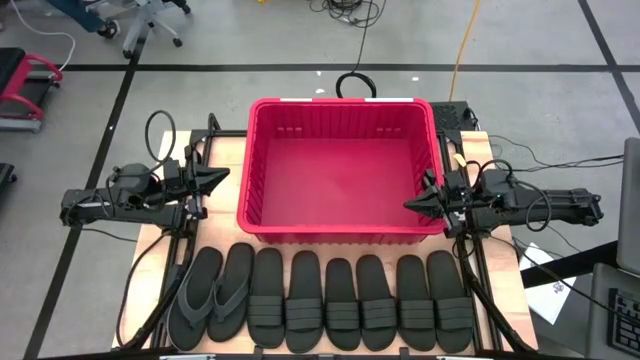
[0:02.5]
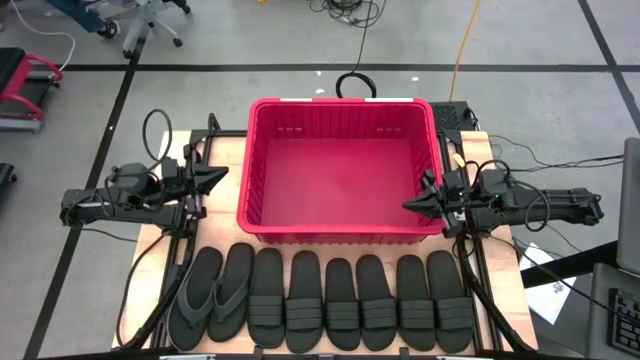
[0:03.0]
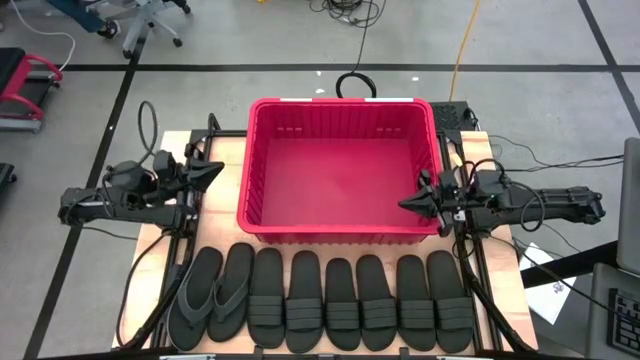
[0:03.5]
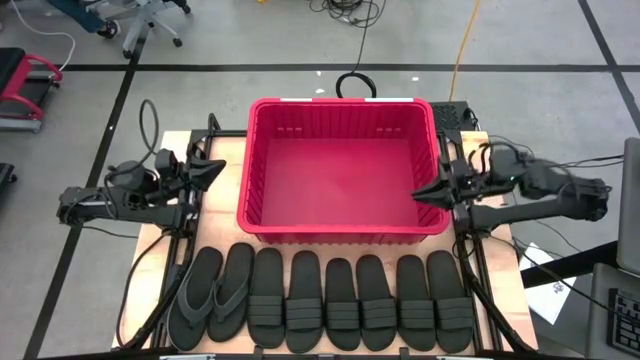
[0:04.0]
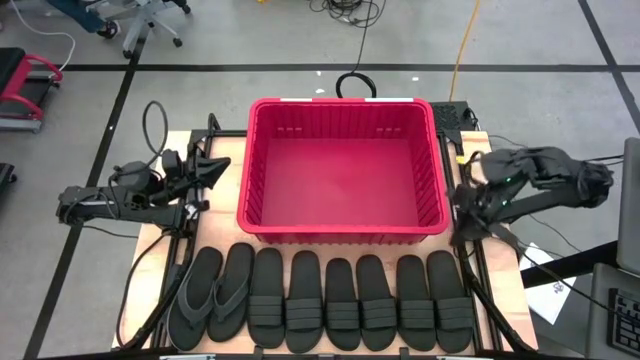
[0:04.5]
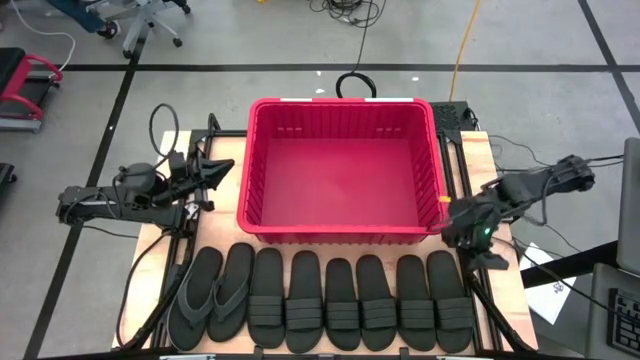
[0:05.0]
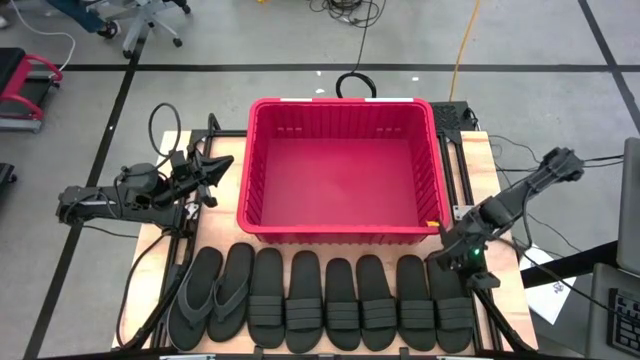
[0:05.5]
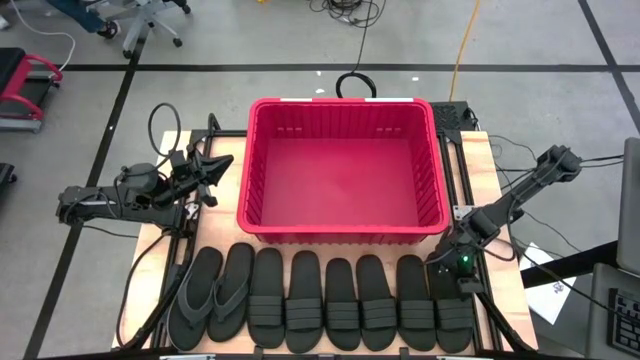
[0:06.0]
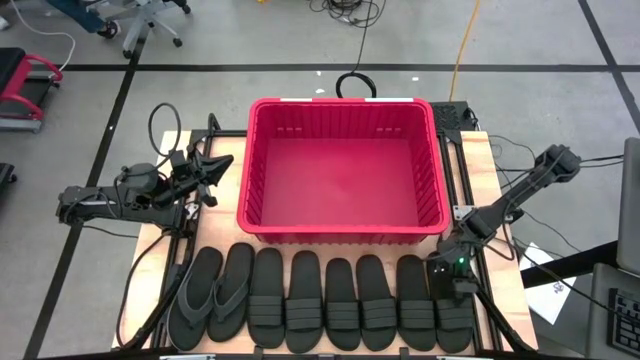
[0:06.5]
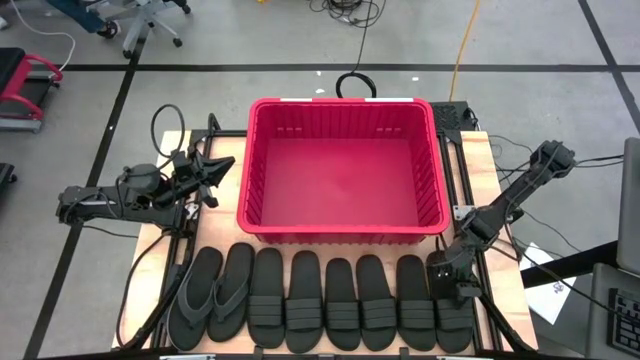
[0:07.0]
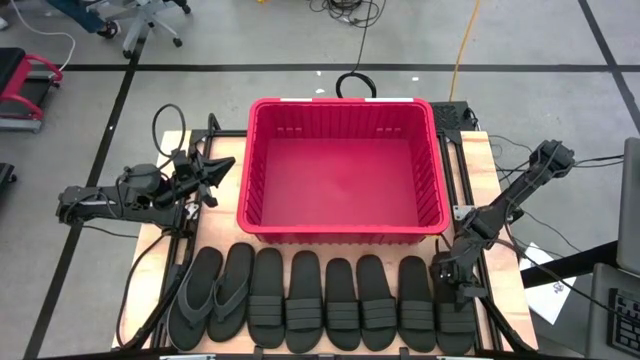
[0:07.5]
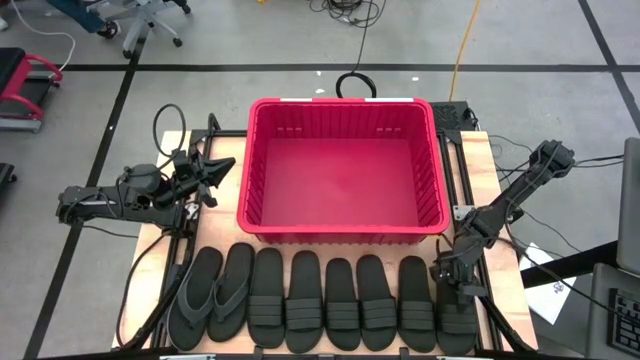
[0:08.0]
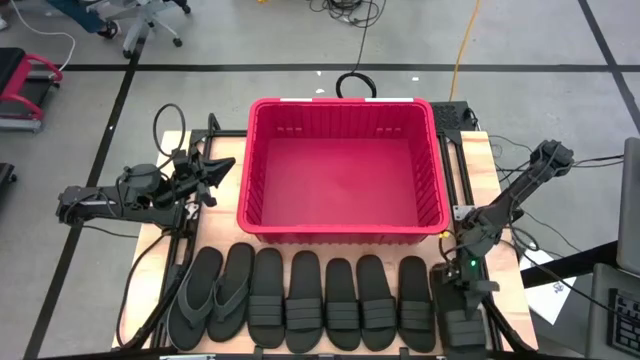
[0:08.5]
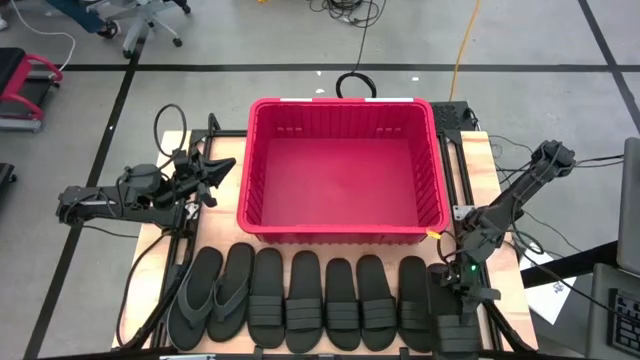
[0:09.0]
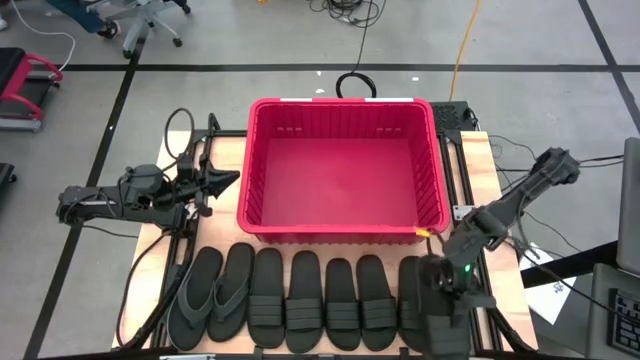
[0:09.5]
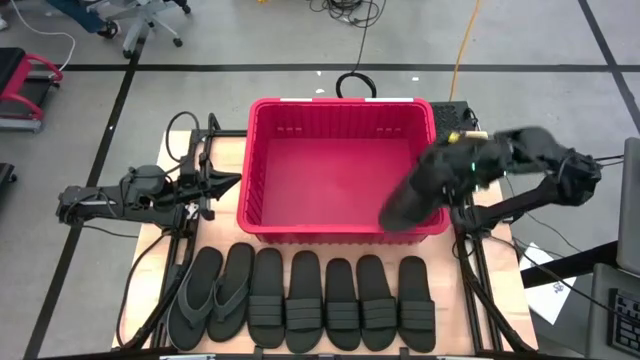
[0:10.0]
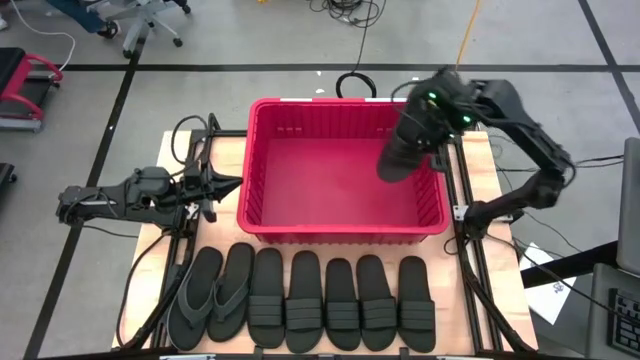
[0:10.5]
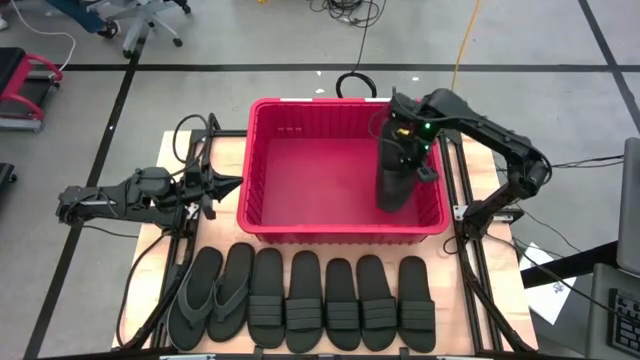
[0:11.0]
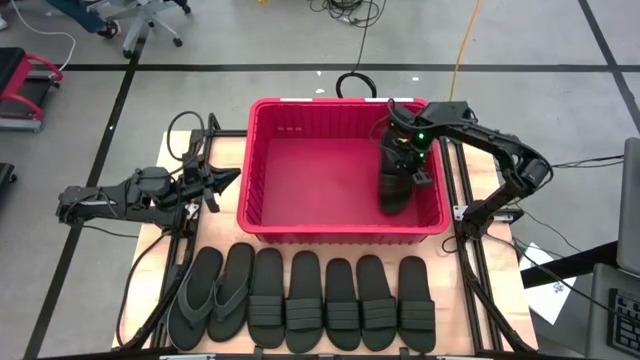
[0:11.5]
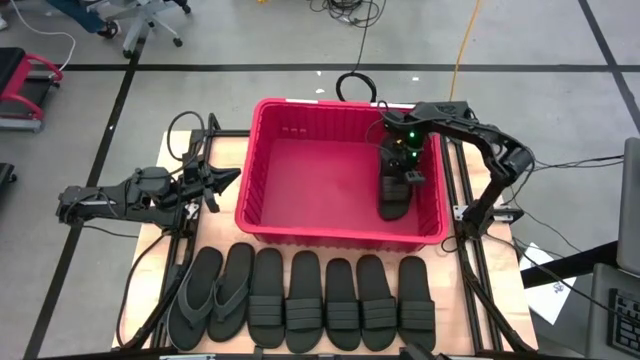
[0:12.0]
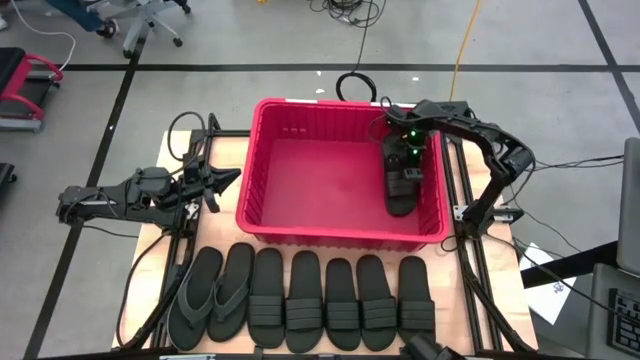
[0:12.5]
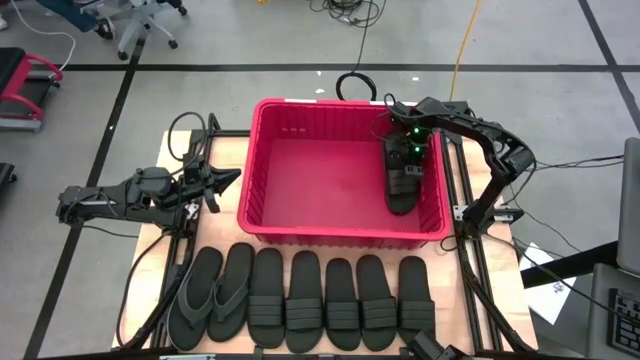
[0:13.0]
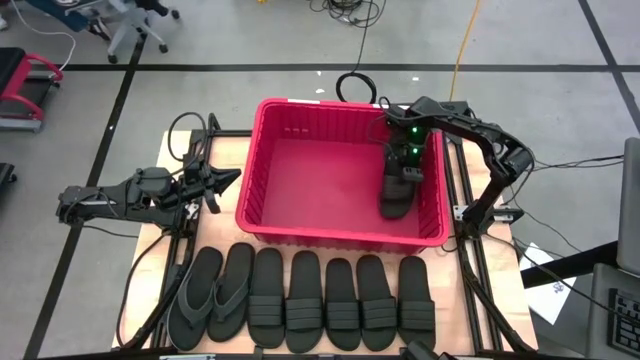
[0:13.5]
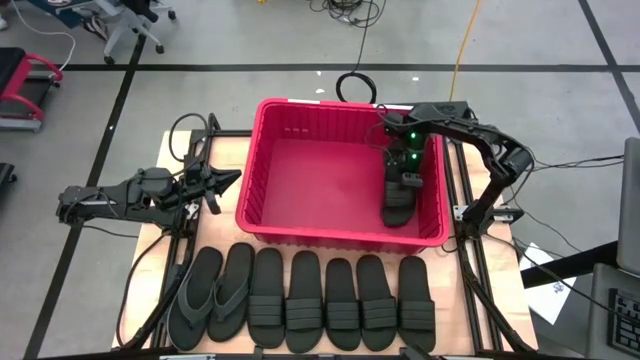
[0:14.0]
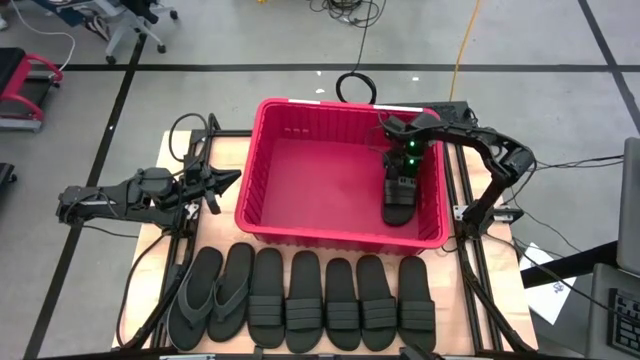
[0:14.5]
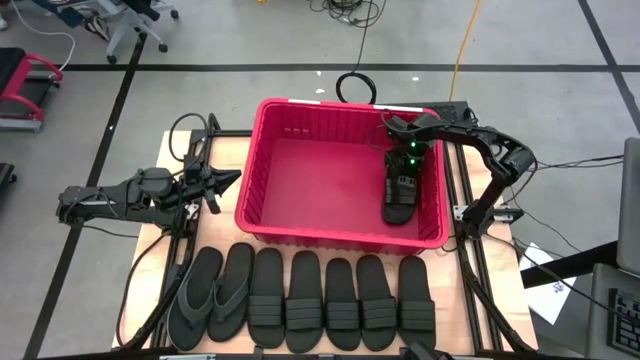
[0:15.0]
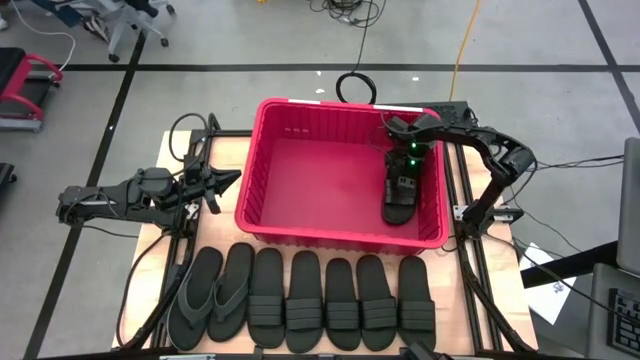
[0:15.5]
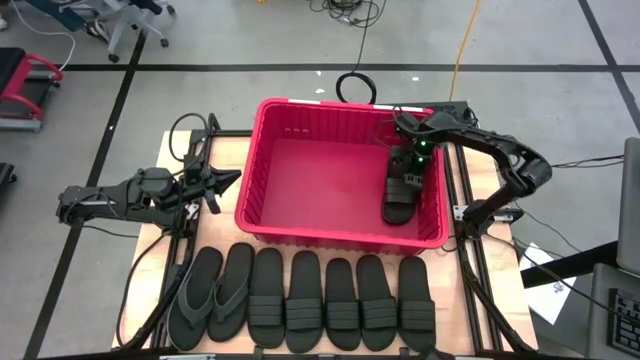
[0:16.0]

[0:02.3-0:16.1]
Task: Pick and place slides into bin
Put the black slide into the red container

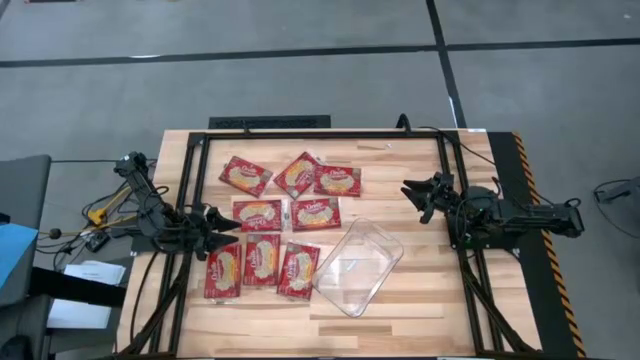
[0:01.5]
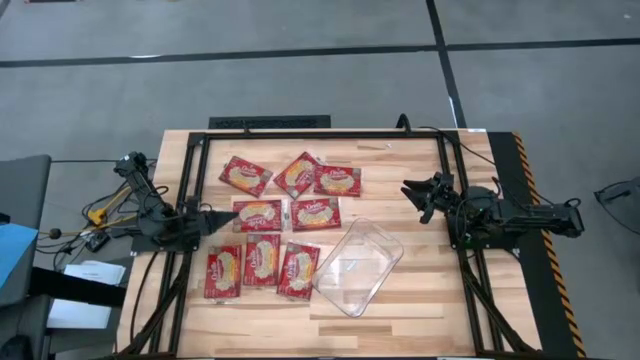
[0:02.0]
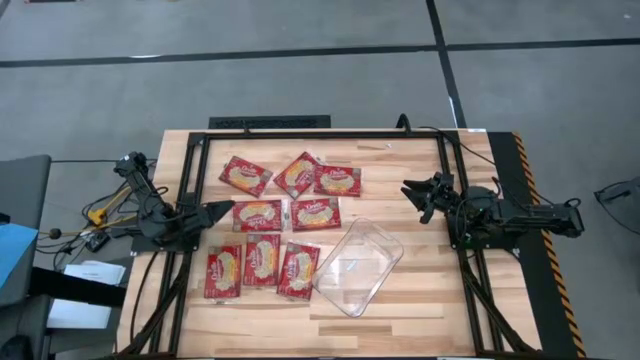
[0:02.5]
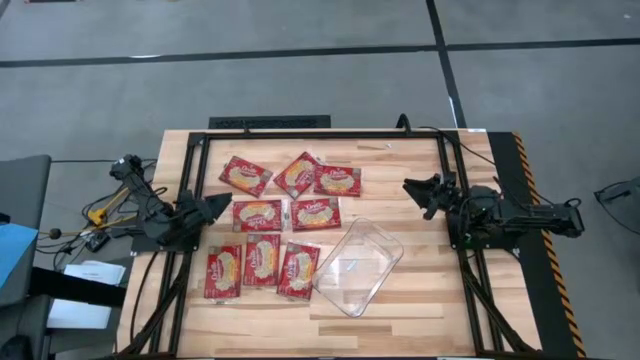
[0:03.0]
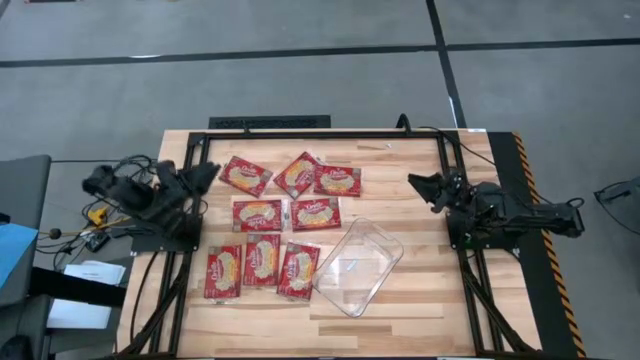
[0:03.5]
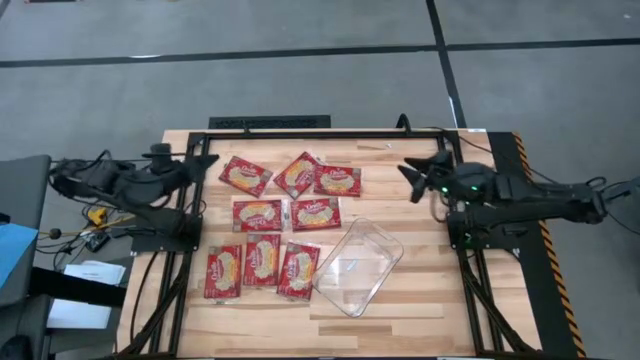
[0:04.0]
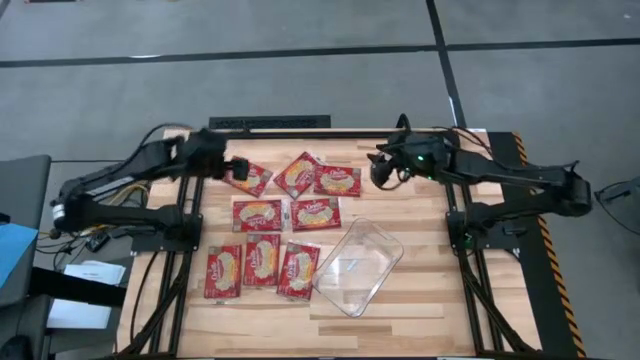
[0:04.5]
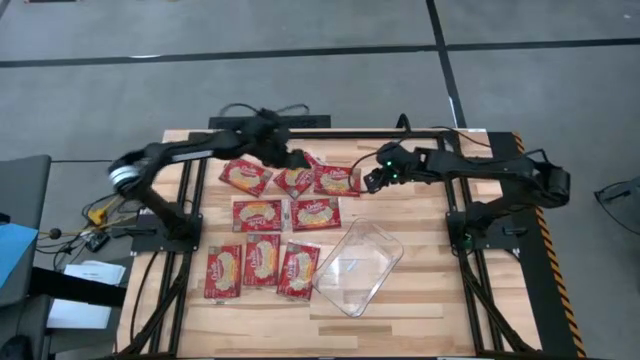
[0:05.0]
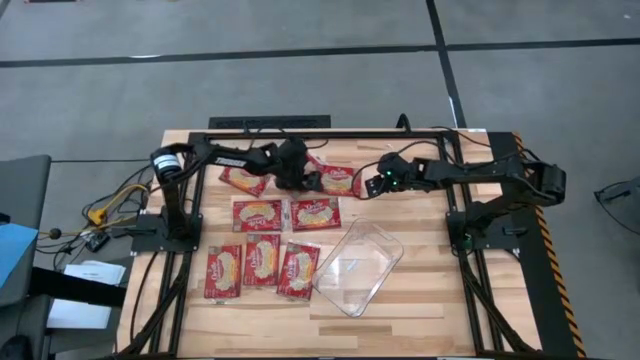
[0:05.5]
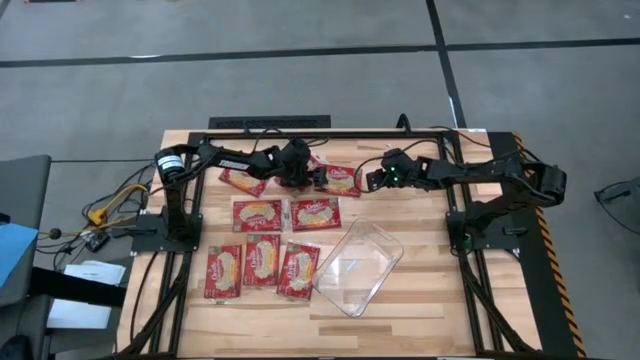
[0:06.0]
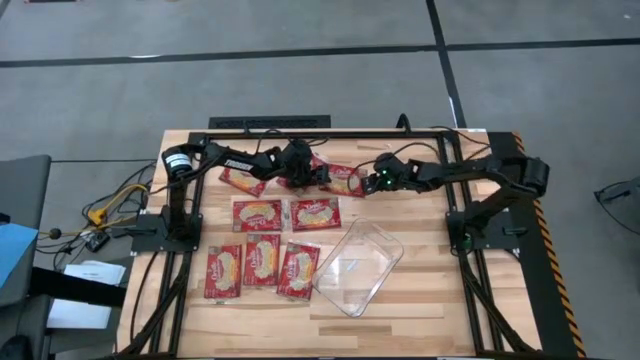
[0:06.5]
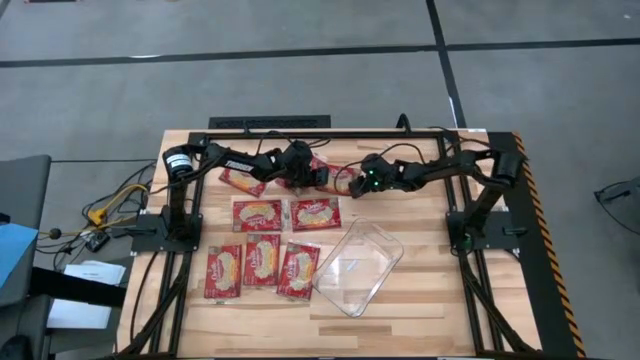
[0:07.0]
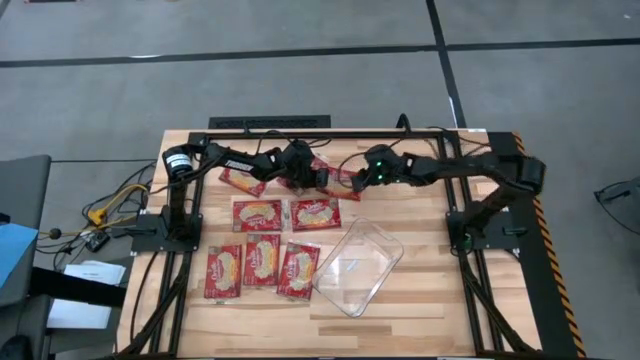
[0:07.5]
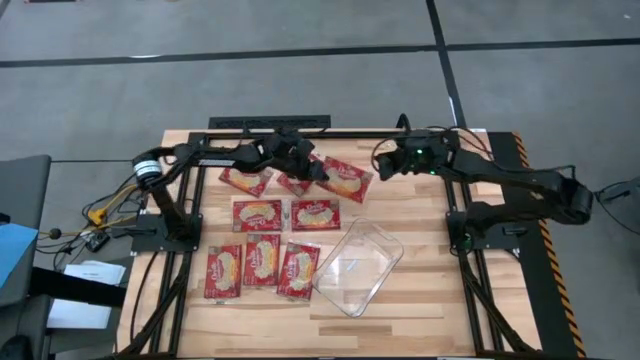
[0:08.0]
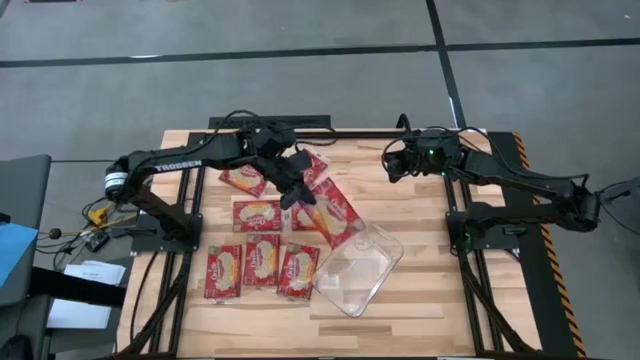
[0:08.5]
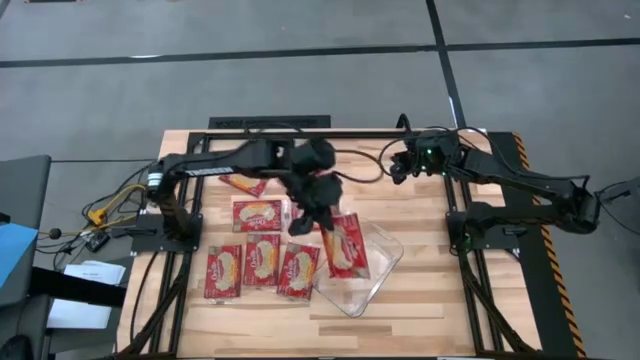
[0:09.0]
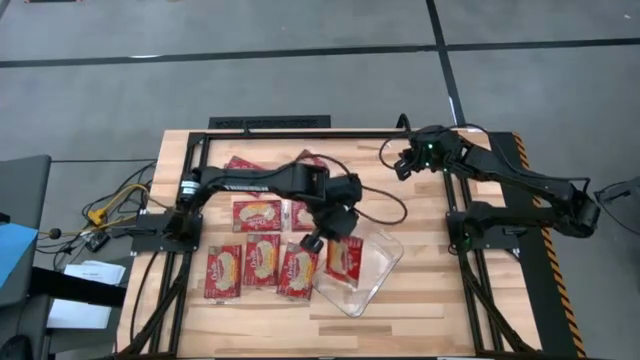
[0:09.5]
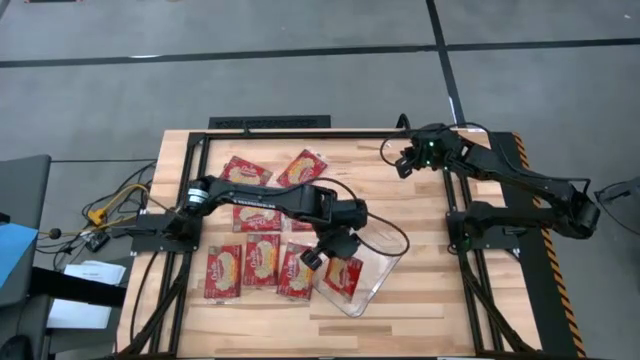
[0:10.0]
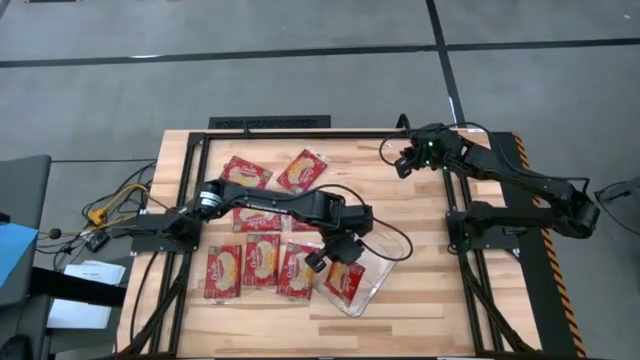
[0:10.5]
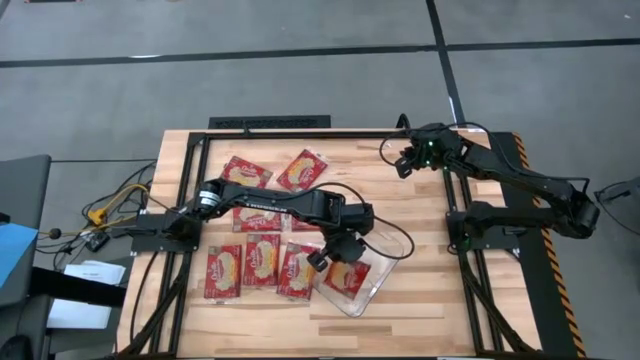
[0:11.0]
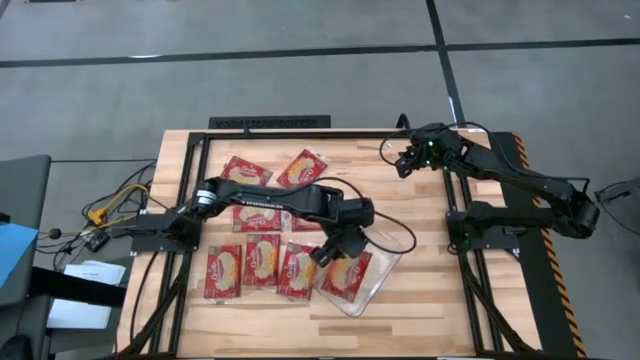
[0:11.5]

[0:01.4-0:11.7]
Task: Sort popcorn bags into baskets
Put the red popcorn packet into the transparent bin
